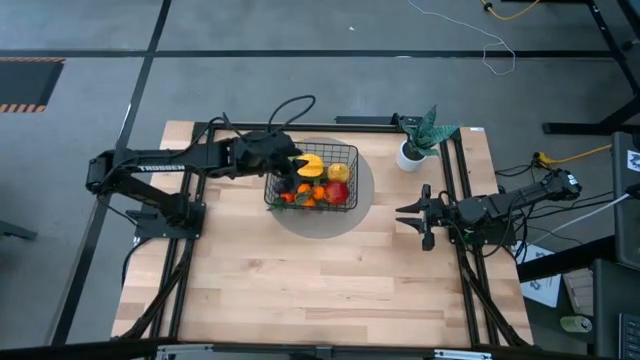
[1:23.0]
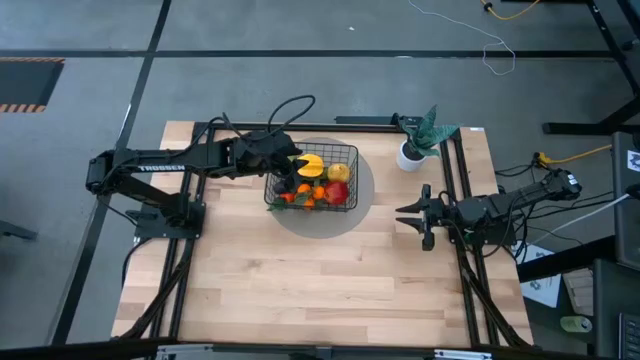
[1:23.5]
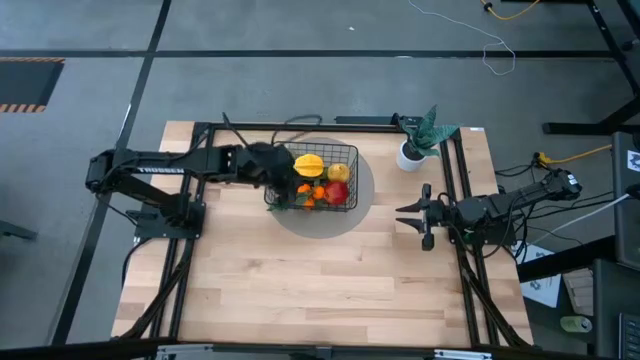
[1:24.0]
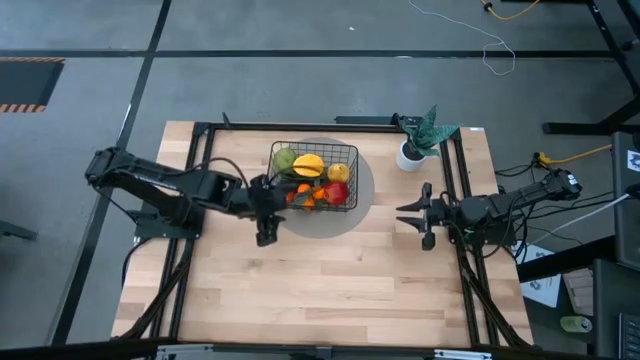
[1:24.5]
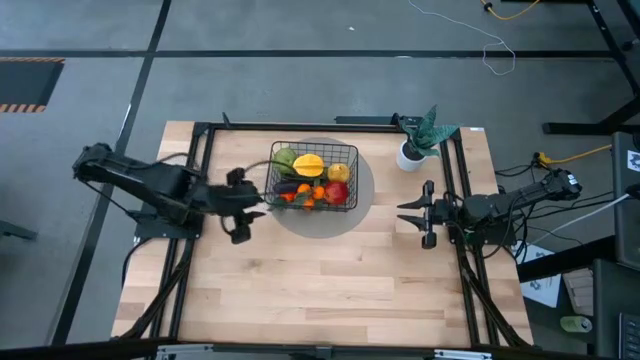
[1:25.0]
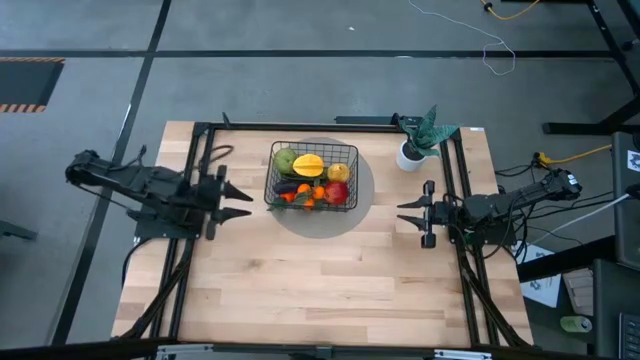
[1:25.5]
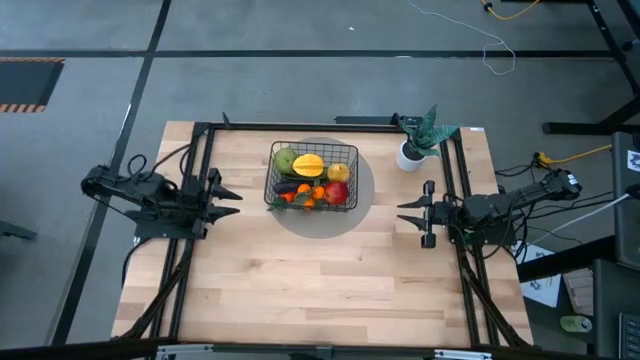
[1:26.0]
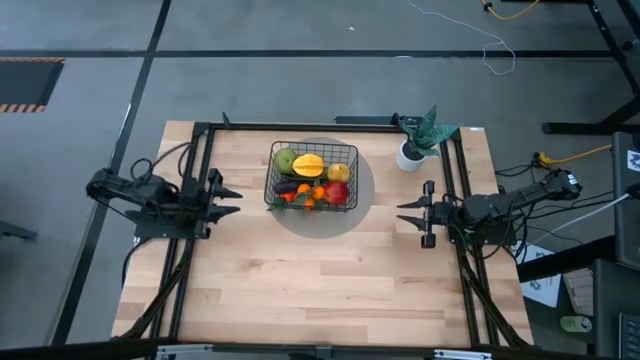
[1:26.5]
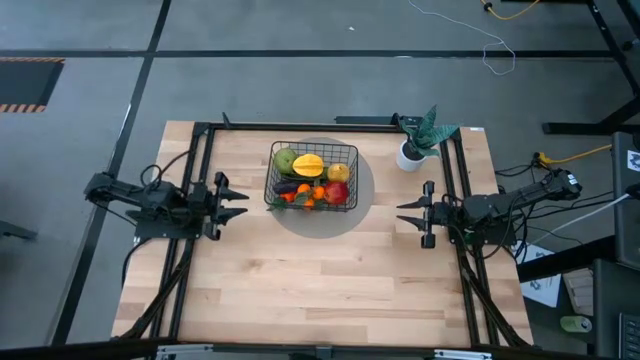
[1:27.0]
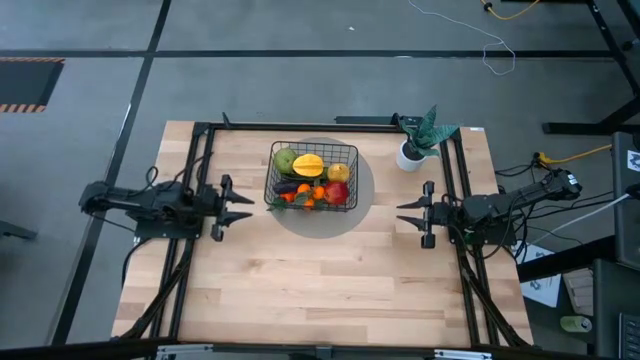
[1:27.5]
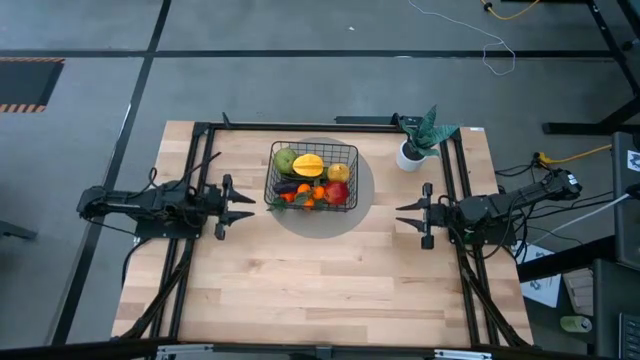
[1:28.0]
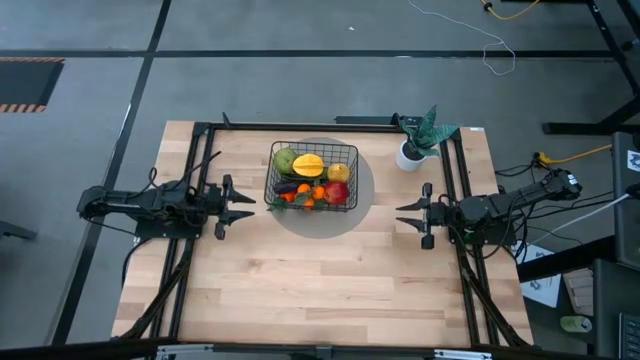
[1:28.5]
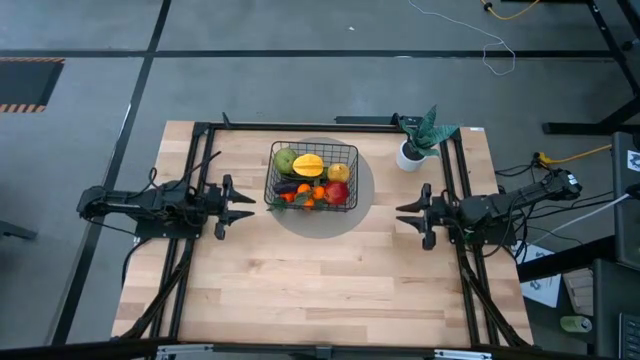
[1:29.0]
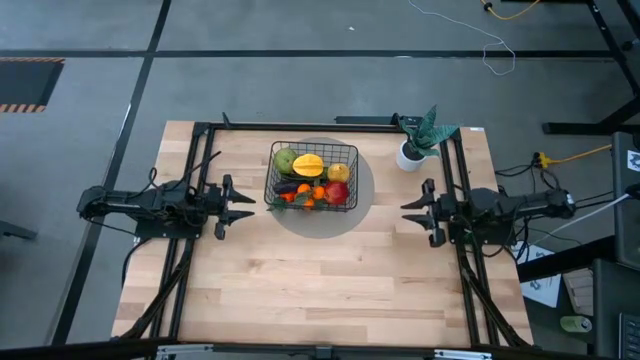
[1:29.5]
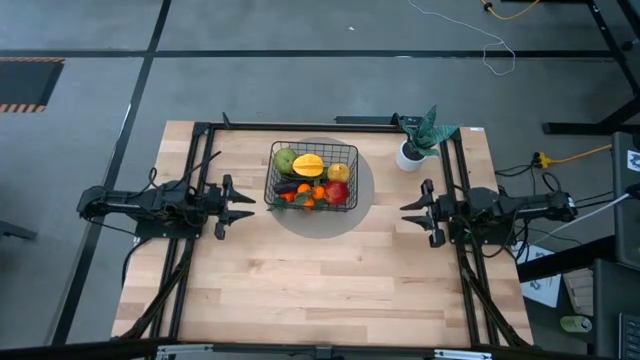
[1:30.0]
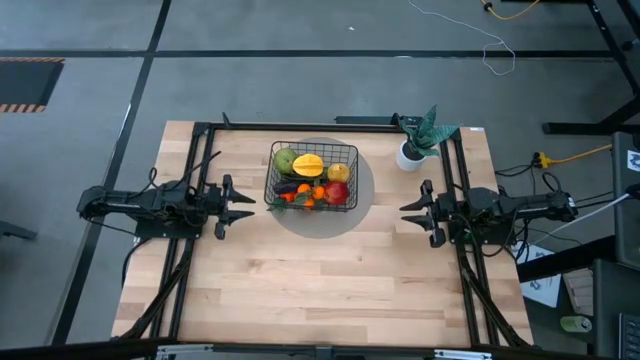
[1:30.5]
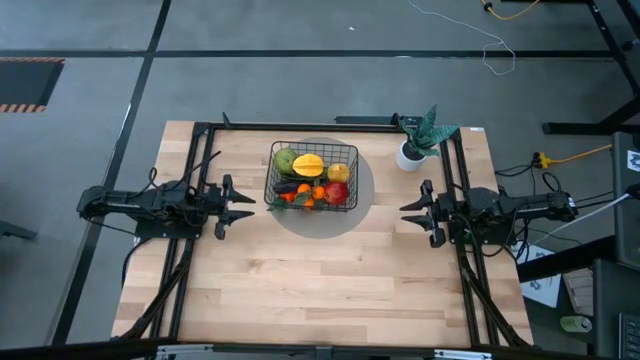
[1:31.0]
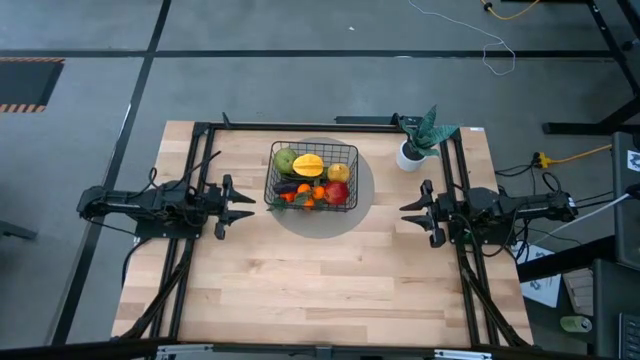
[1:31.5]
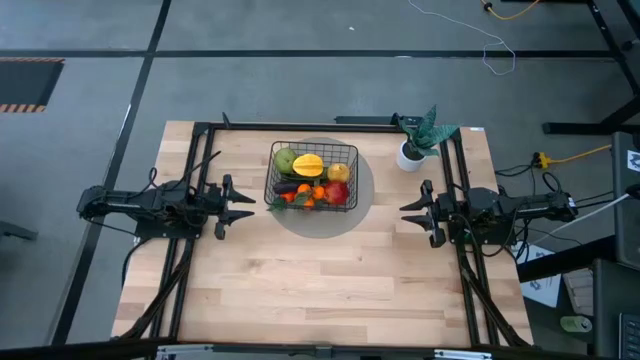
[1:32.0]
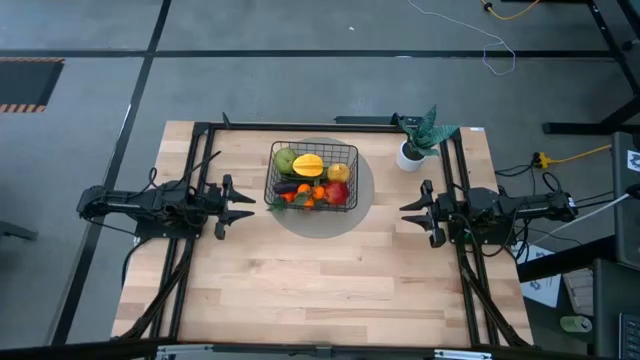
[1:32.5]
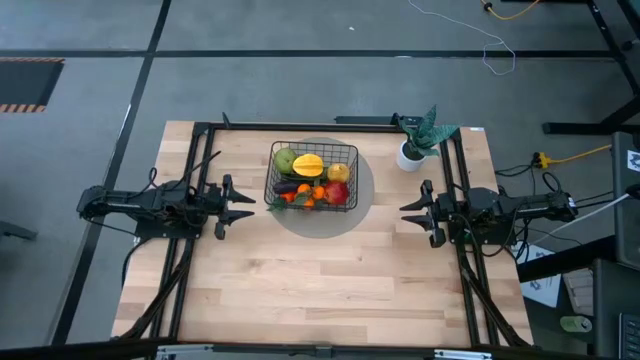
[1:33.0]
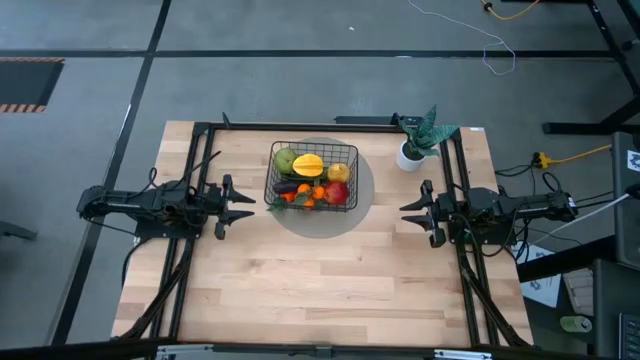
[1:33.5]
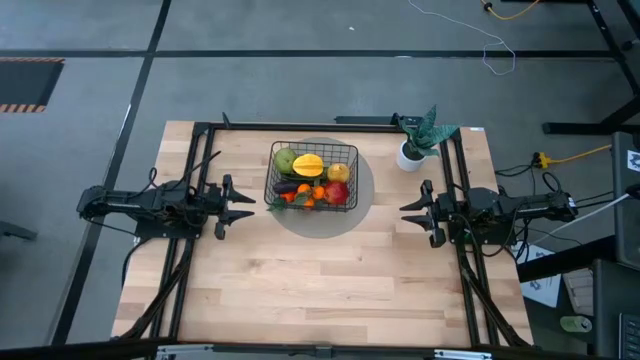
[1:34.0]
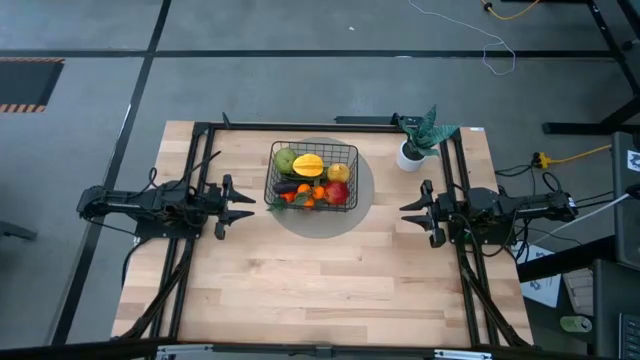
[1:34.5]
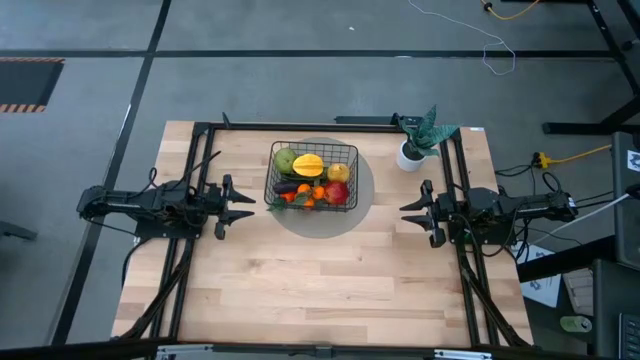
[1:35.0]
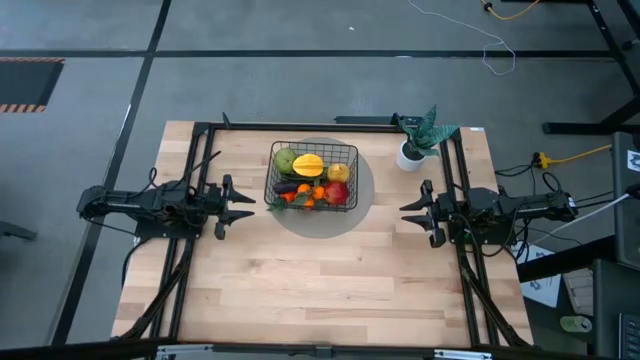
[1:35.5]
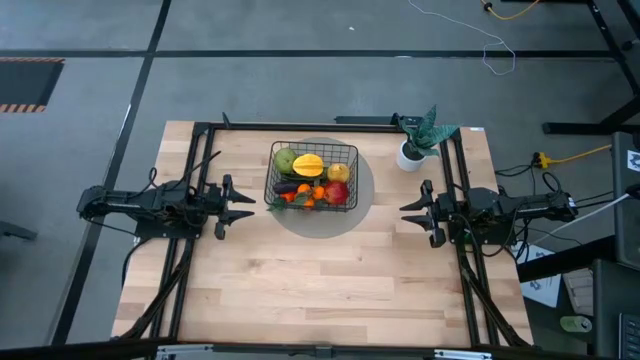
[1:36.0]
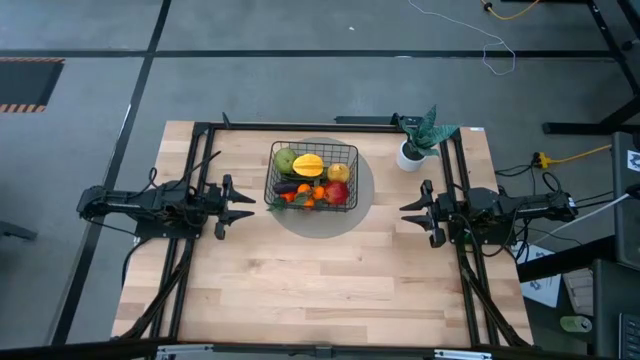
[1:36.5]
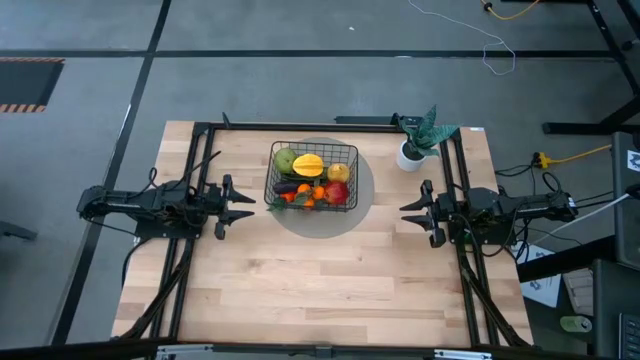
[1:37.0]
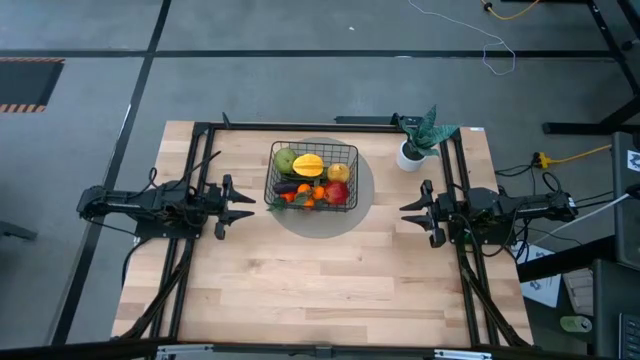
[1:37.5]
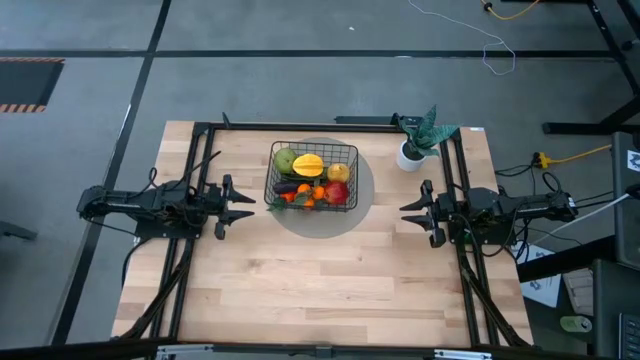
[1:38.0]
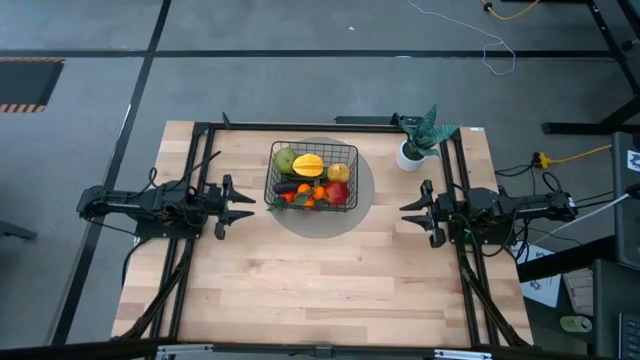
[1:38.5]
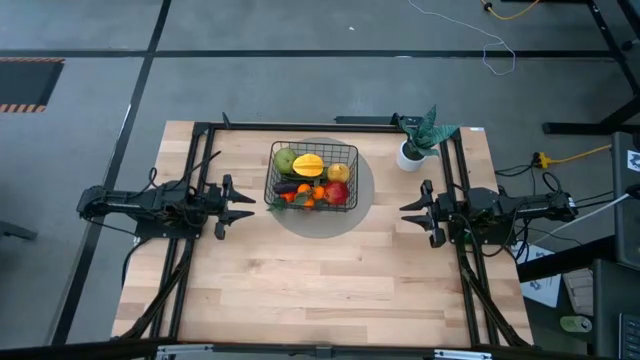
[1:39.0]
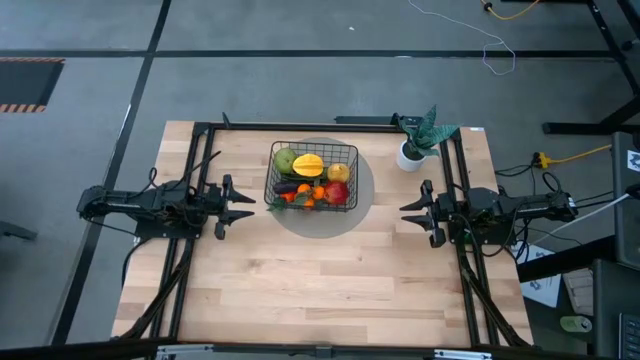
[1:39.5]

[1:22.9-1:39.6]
Task: Build produce basket
Return to Home Position

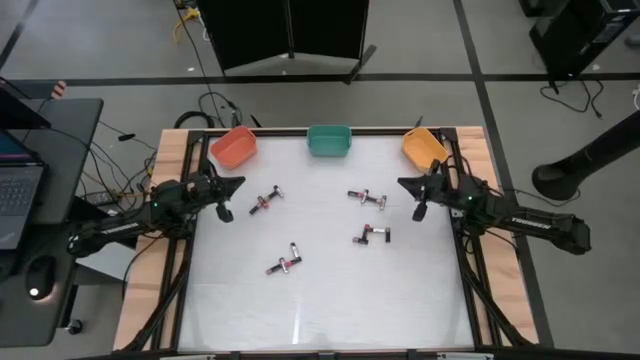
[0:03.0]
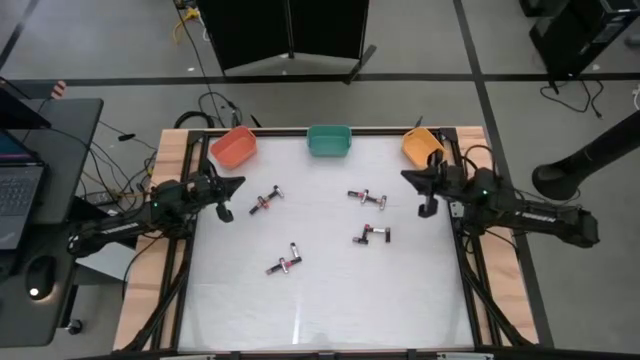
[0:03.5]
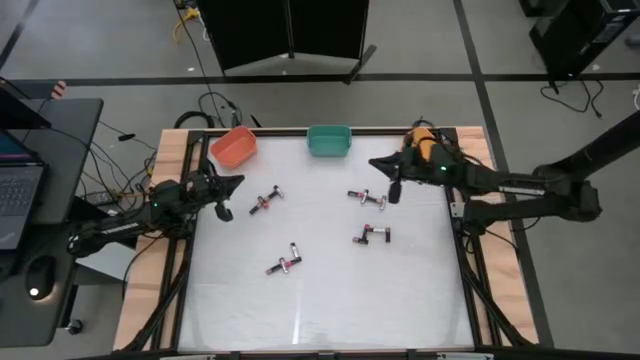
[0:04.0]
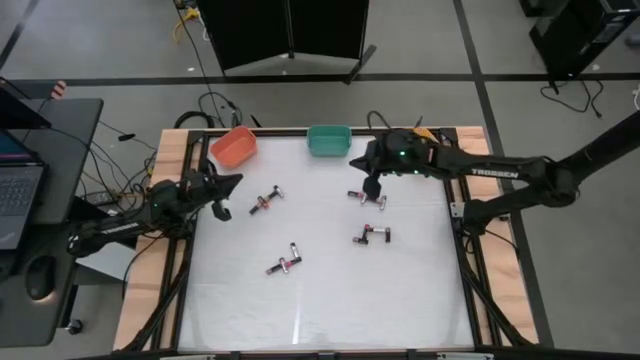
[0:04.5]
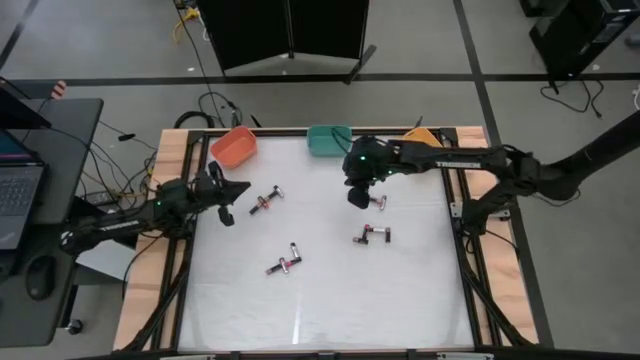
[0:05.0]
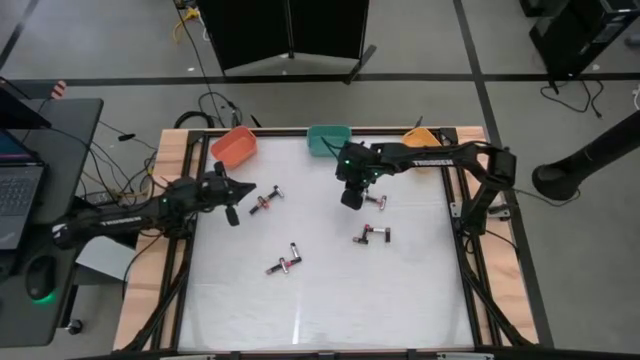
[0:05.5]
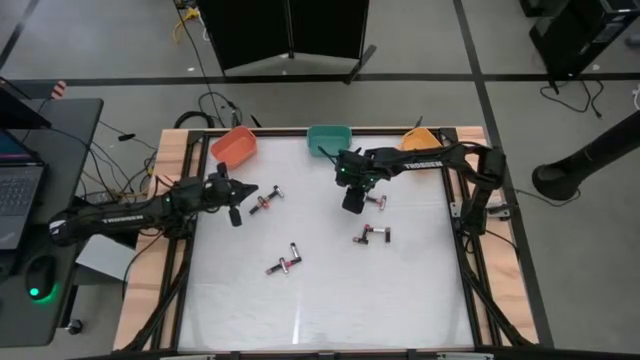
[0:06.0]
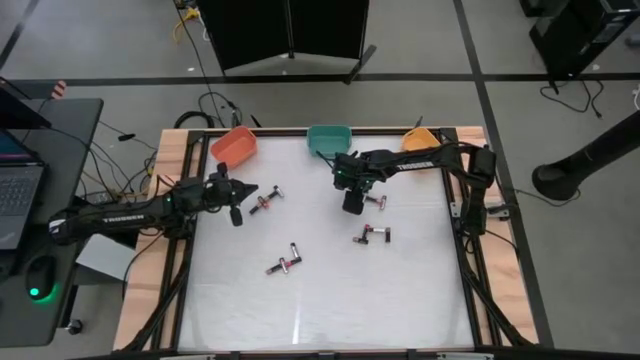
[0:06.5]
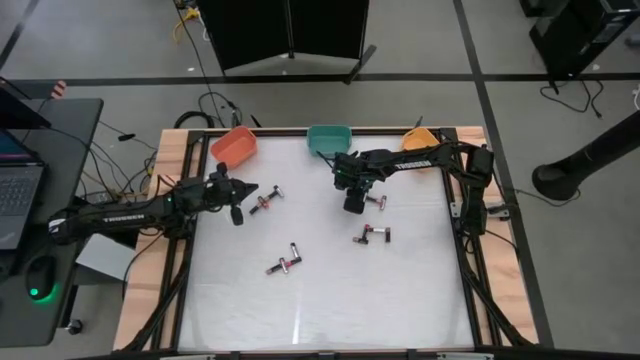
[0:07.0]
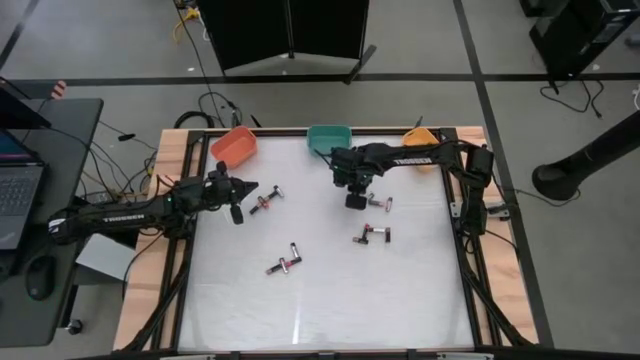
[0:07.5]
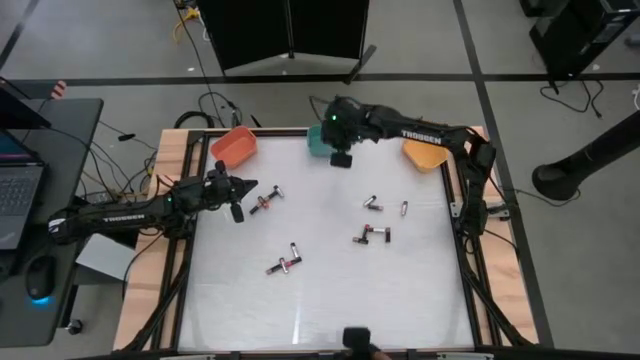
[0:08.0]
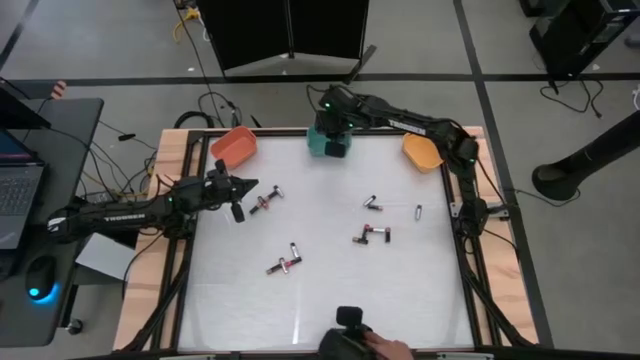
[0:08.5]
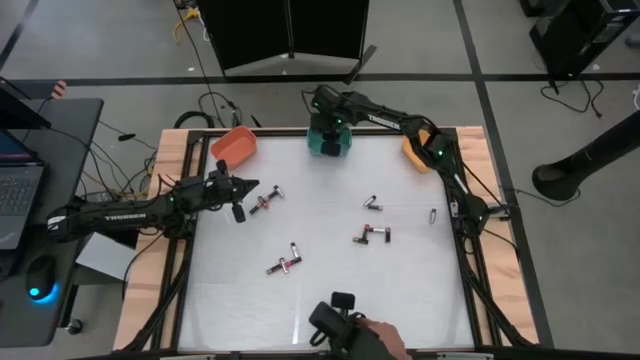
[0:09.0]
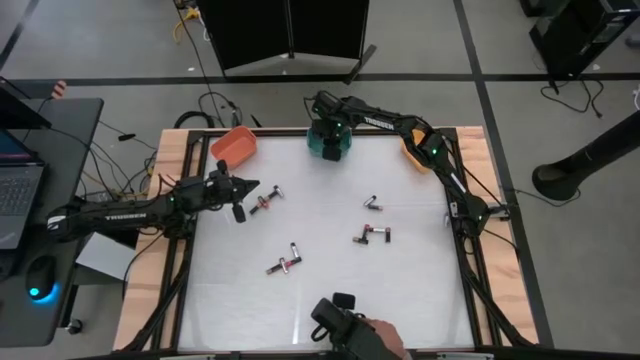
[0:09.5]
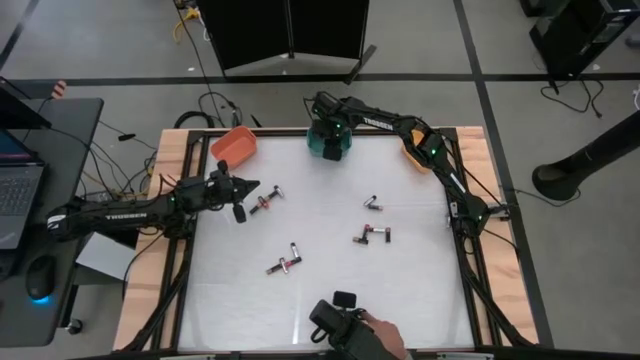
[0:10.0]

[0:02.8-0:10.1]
Task: Sort batteries
Put the red battery into the green bin
